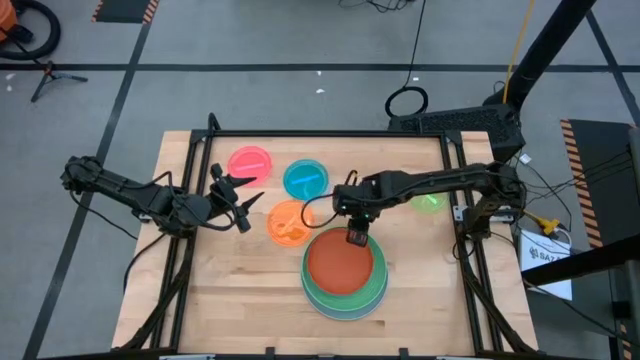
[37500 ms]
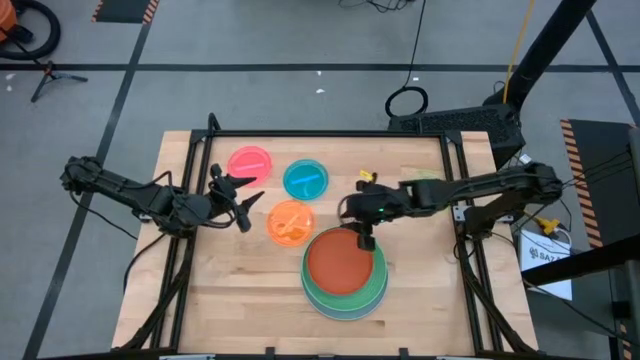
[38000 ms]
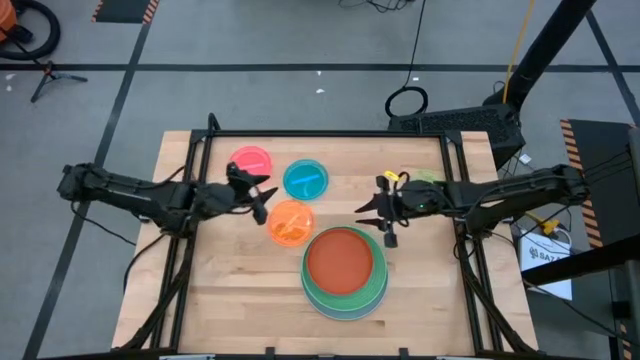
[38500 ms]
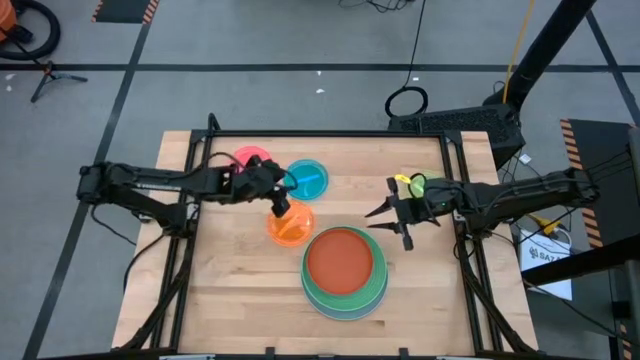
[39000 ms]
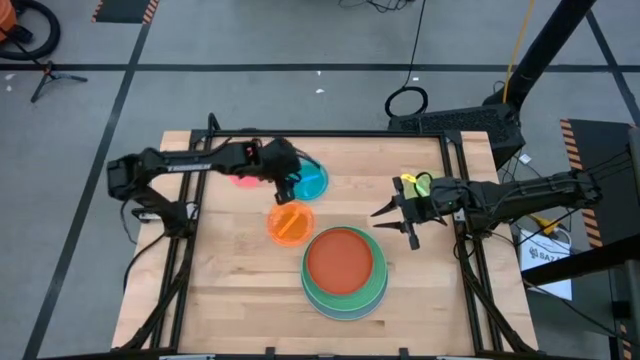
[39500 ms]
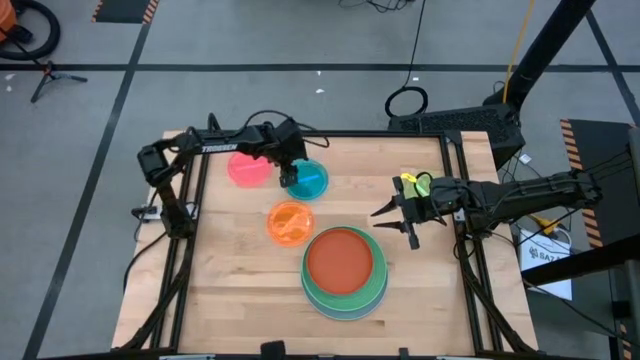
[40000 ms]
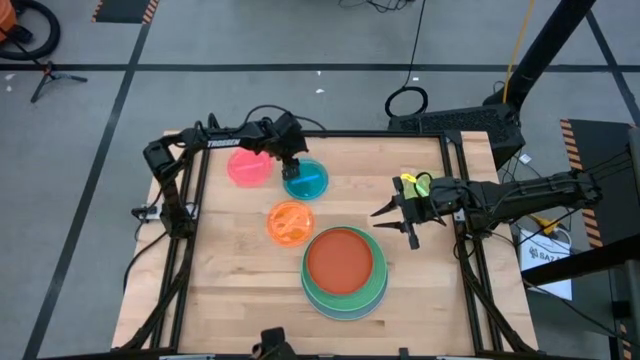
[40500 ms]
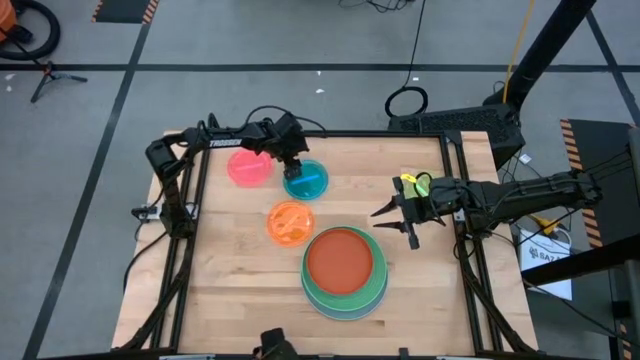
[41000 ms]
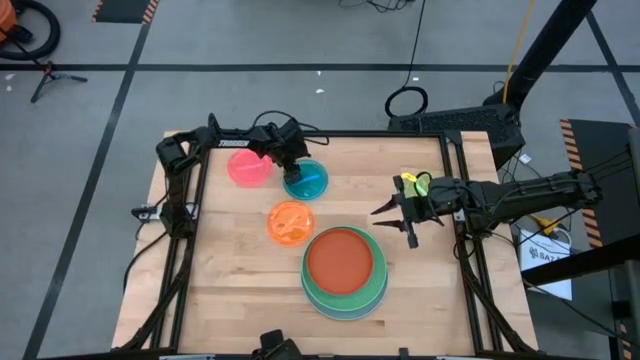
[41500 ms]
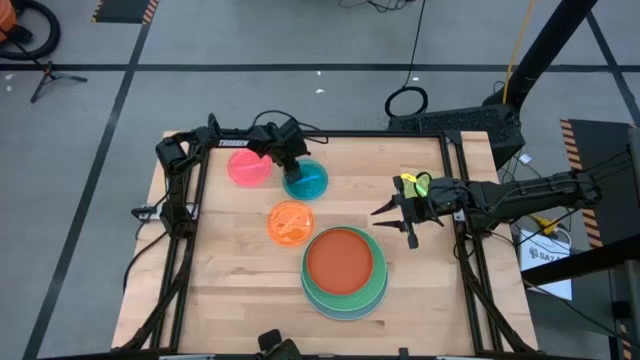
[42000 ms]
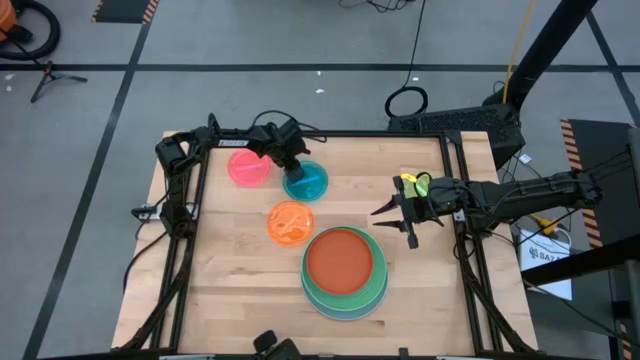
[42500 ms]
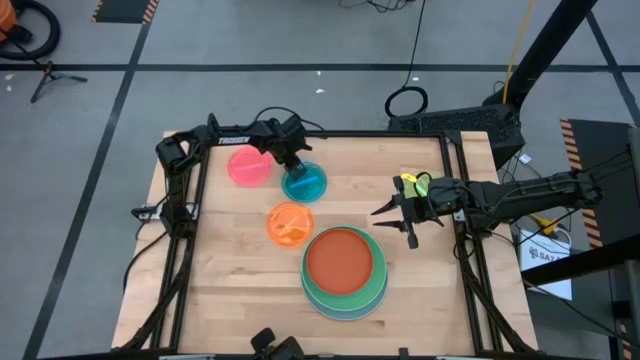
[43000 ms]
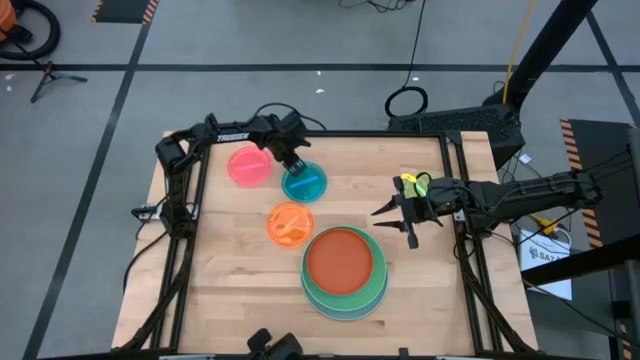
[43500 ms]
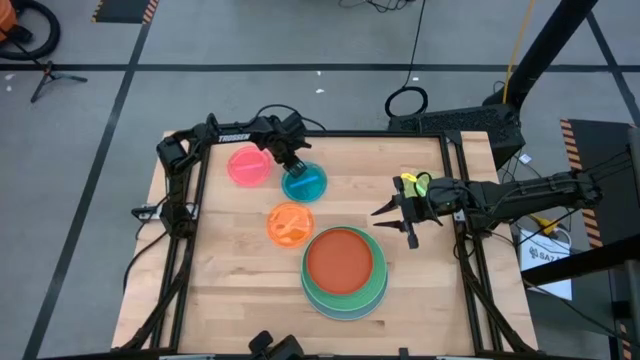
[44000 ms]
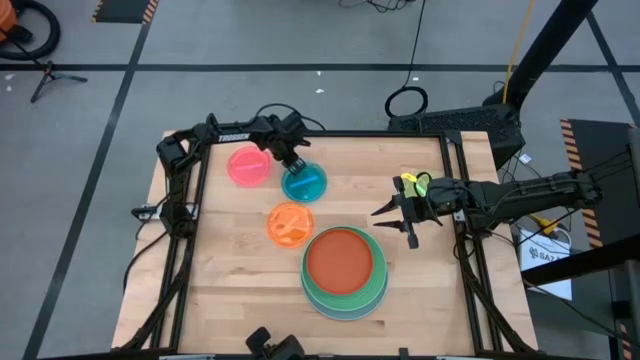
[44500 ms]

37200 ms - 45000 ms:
Task: Stack plastic plates
Stack the blue plate on top of the dark orange plate

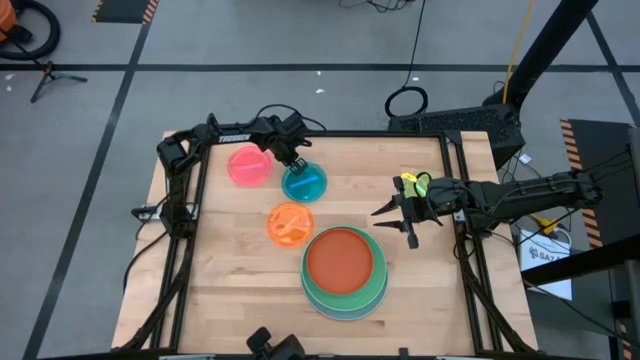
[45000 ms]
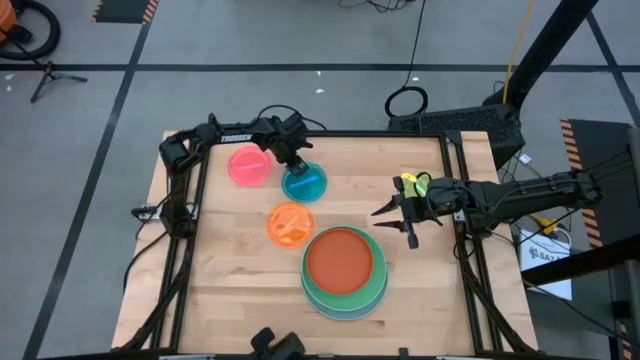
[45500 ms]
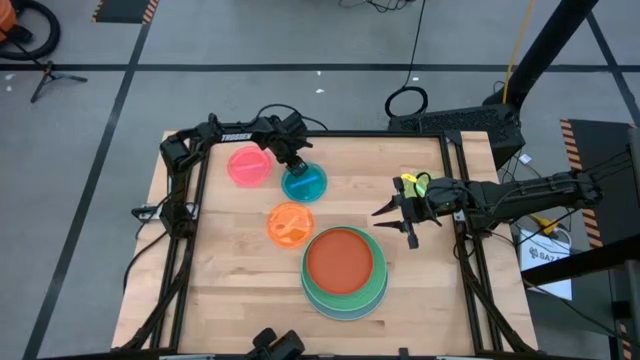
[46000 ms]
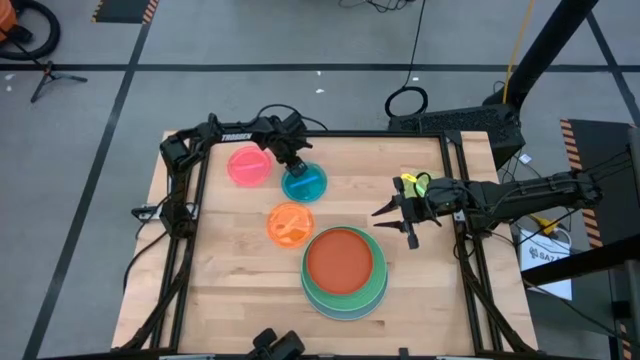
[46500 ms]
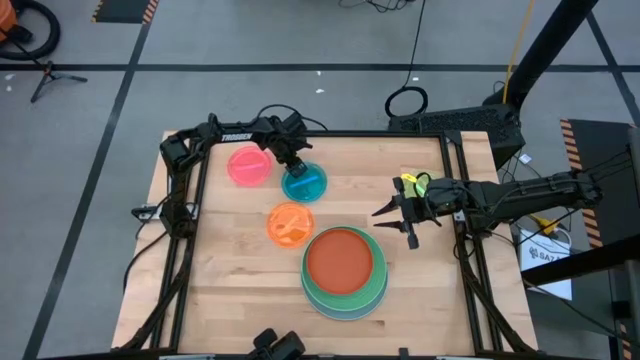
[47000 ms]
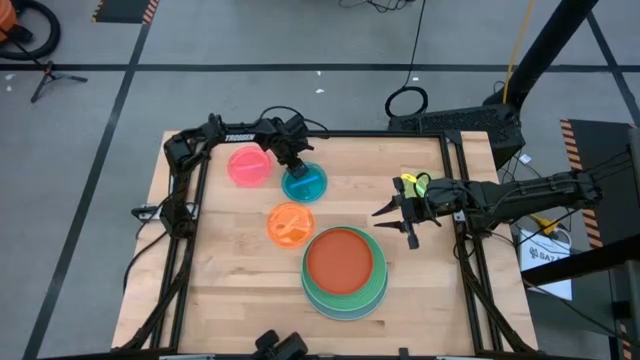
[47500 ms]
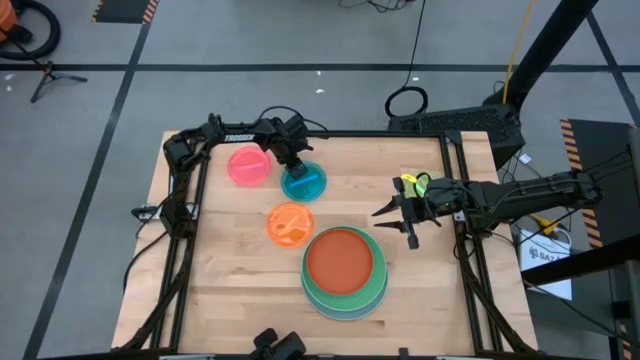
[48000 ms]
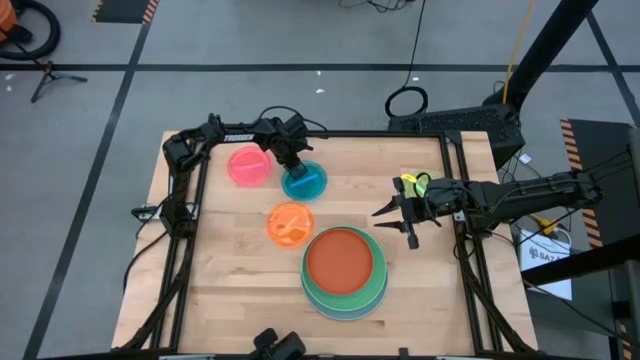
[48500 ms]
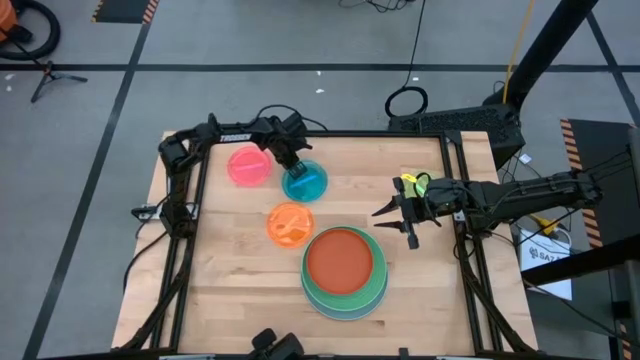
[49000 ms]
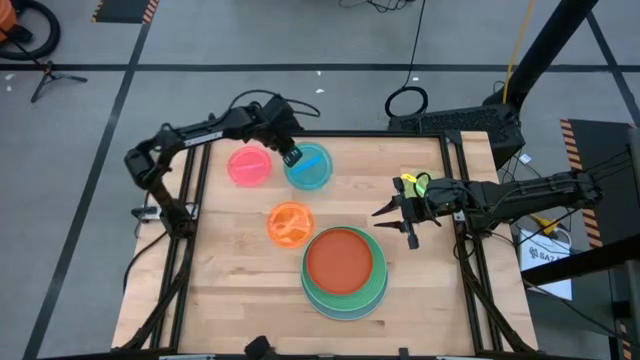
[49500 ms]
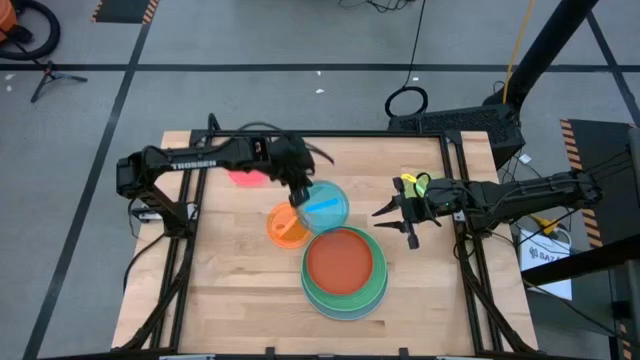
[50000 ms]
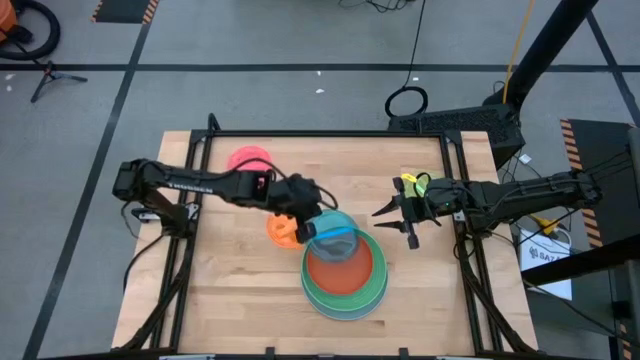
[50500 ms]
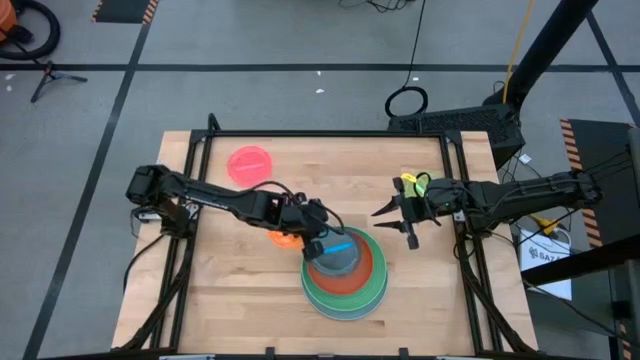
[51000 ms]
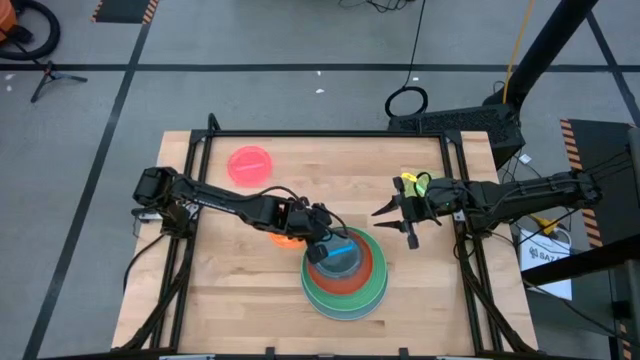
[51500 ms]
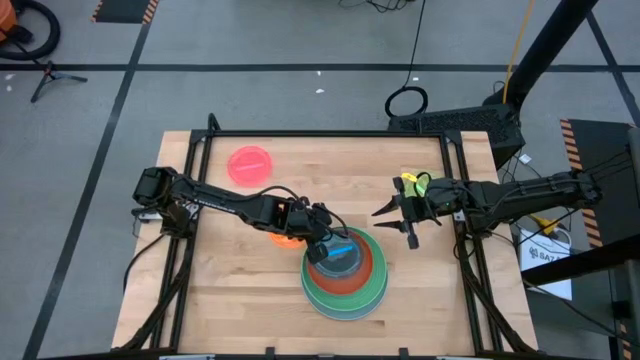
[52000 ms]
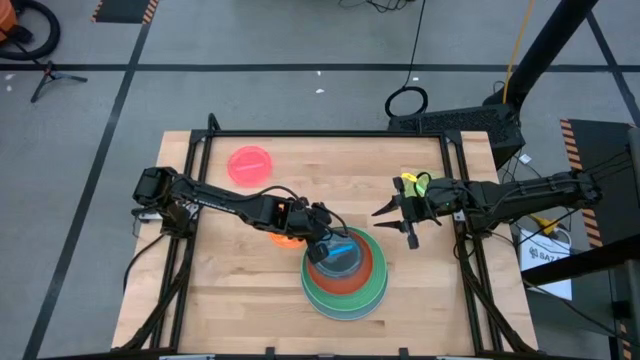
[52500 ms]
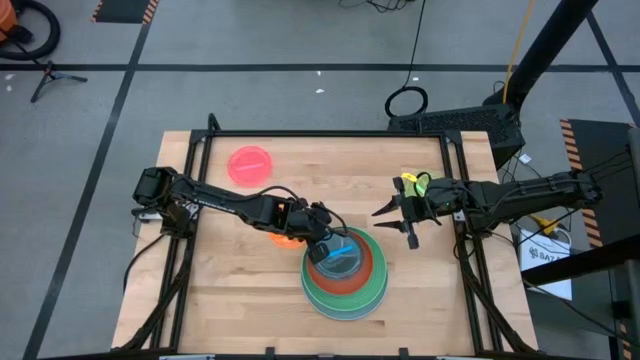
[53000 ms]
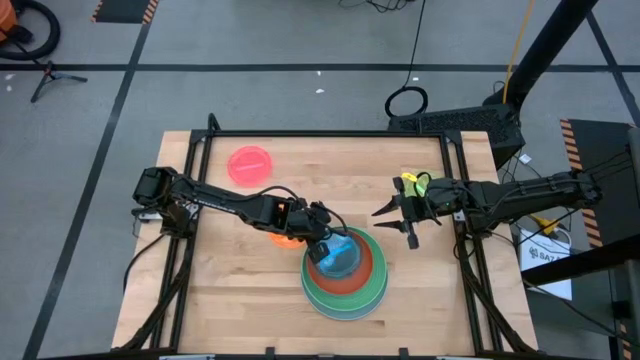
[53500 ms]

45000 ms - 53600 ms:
Stack the blue plate on top of the dark orange plate

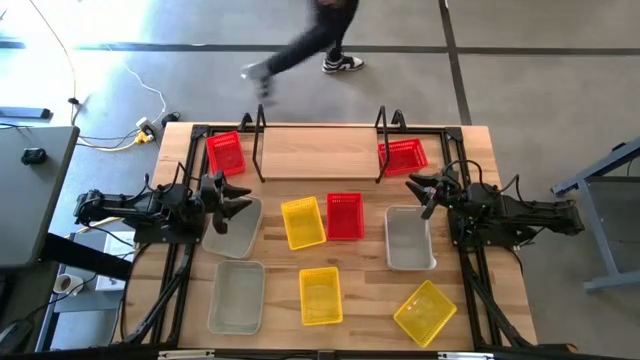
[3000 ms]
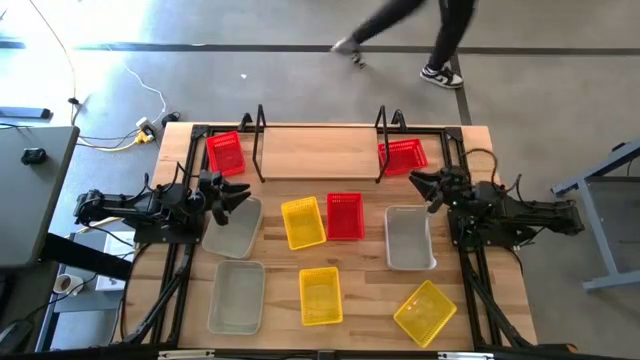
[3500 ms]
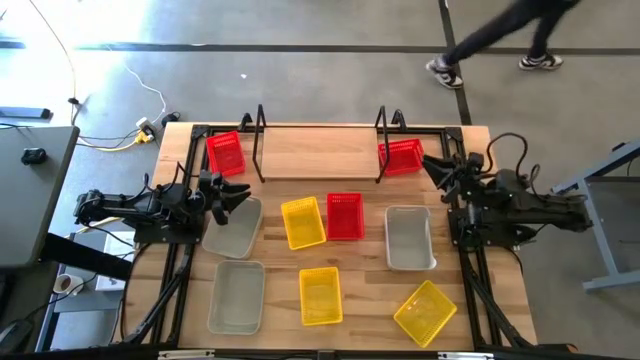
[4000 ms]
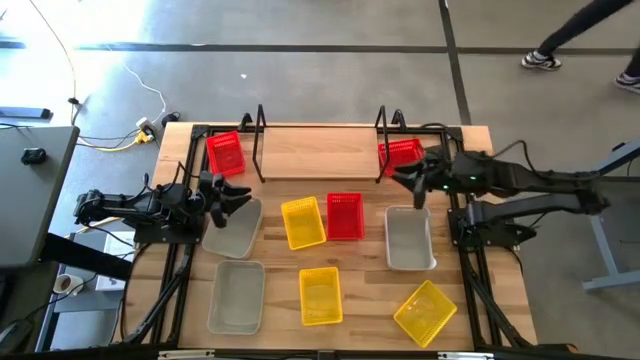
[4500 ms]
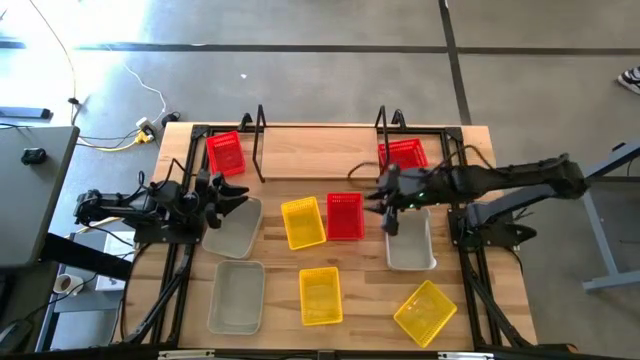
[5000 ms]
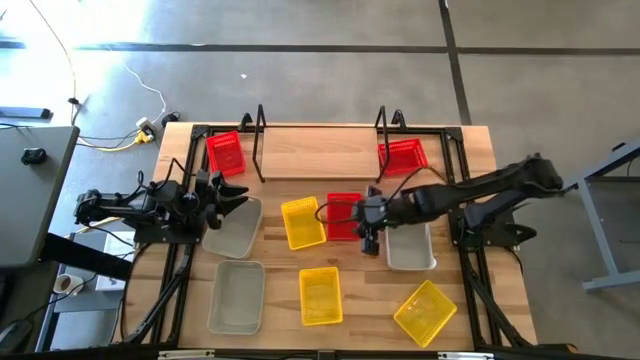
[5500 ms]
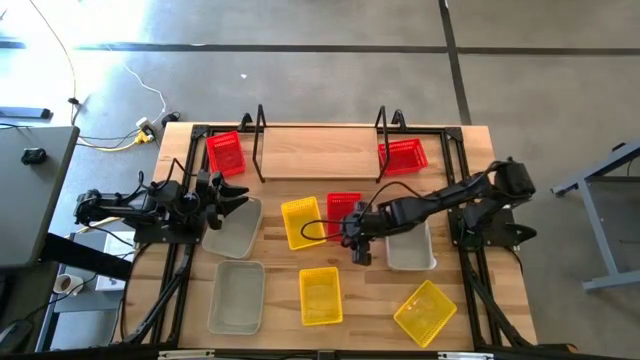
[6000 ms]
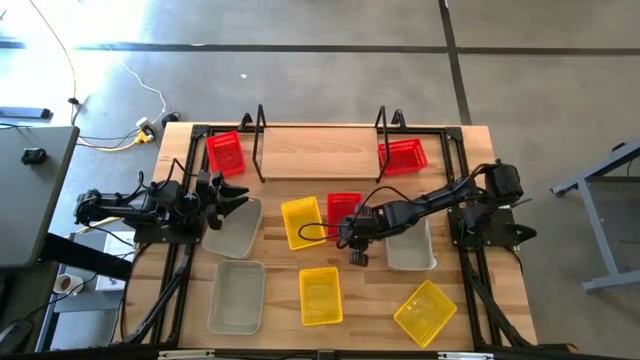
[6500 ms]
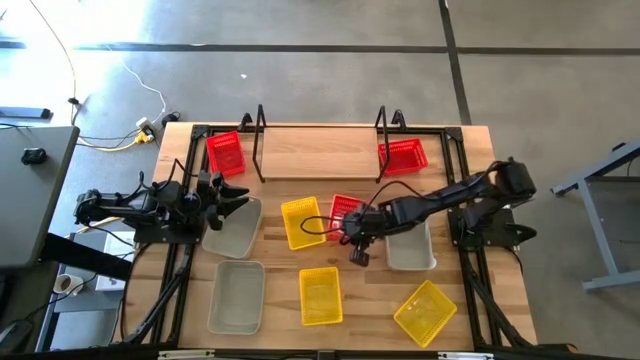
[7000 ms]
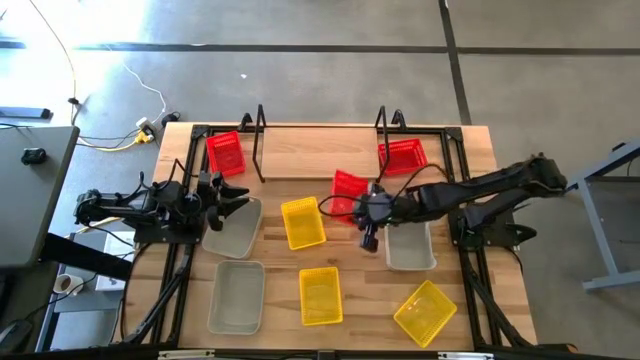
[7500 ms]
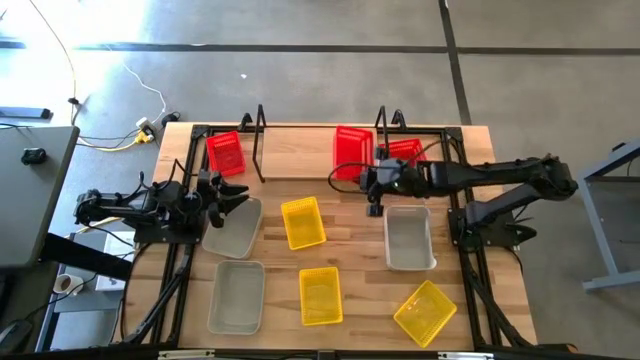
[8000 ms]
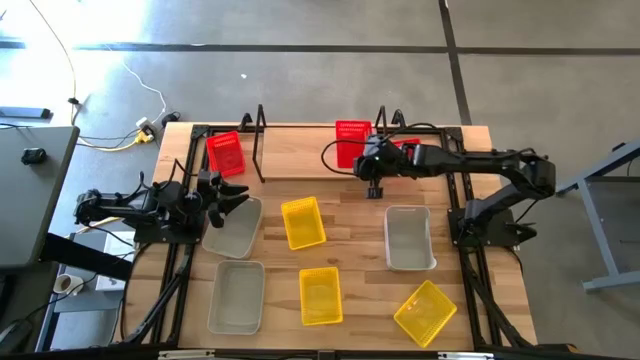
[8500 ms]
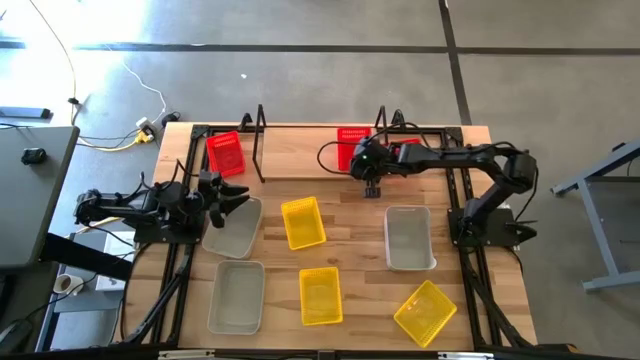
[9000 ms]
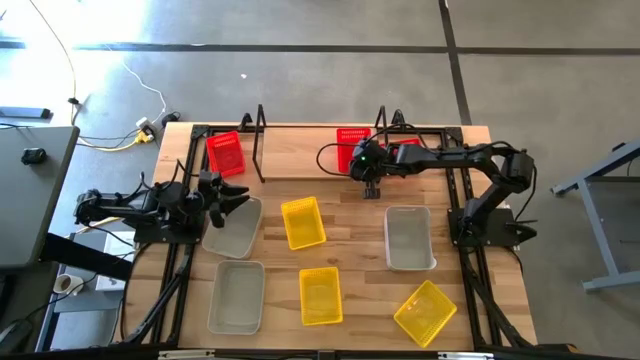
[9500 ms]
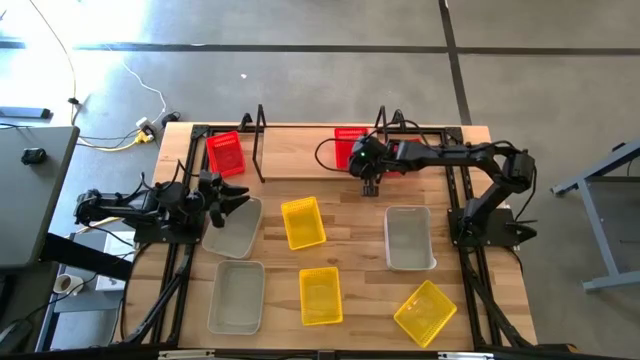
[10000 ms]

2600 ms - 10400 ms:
Task: Stack baskets on shelf by color
Put the bottom red bin on the shelf
